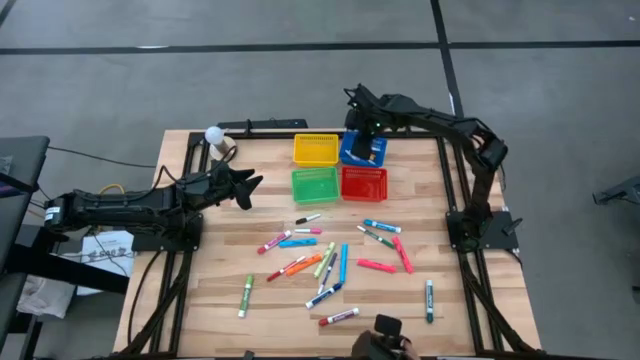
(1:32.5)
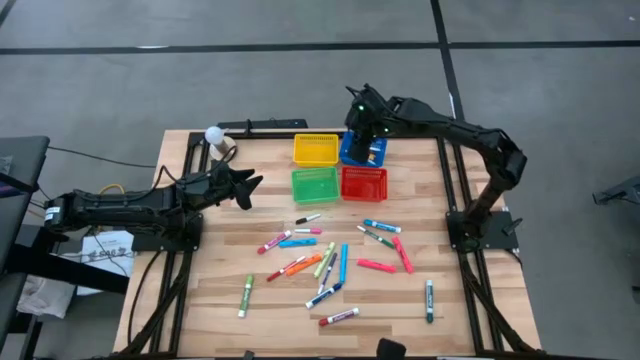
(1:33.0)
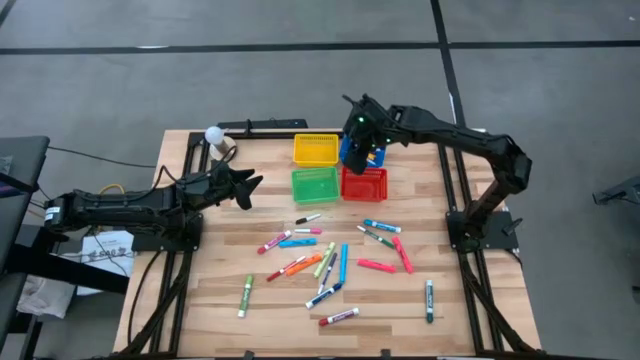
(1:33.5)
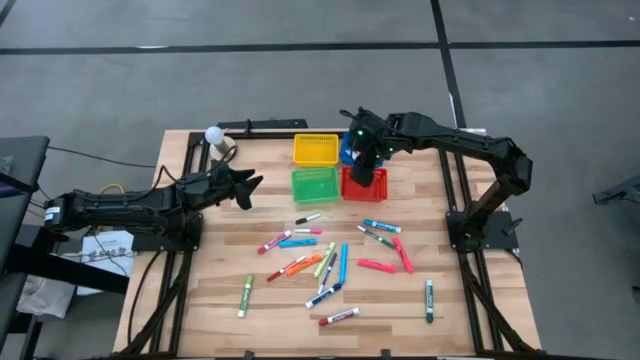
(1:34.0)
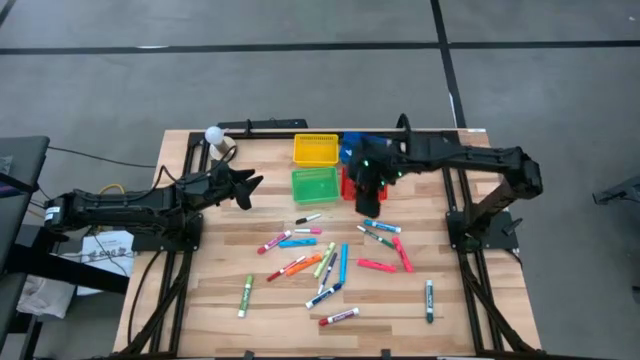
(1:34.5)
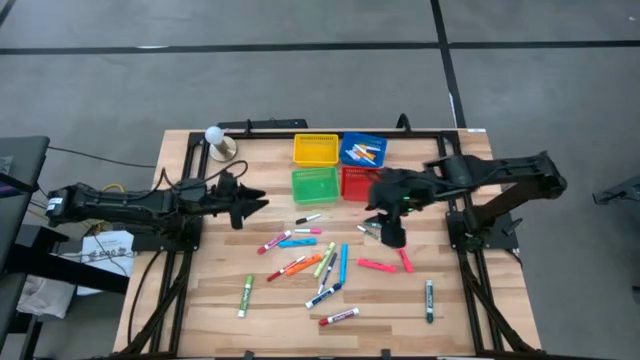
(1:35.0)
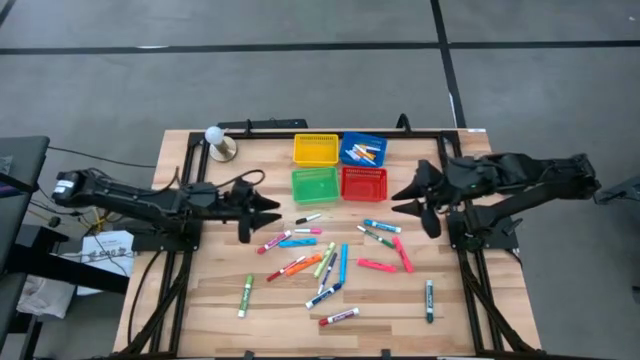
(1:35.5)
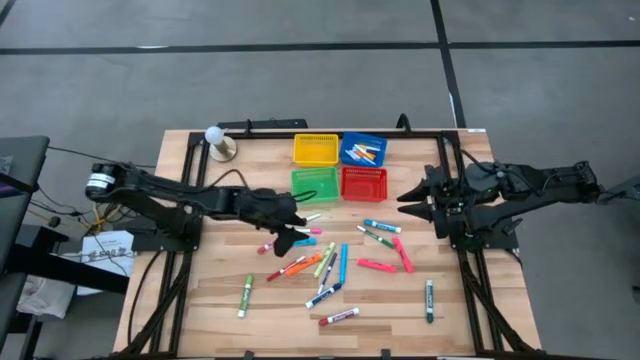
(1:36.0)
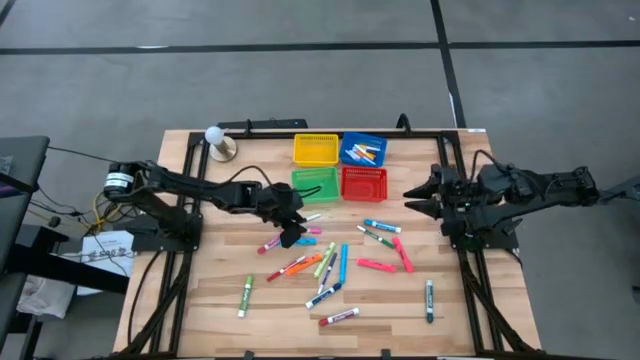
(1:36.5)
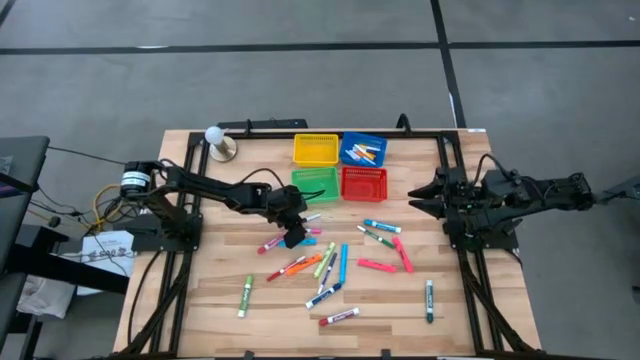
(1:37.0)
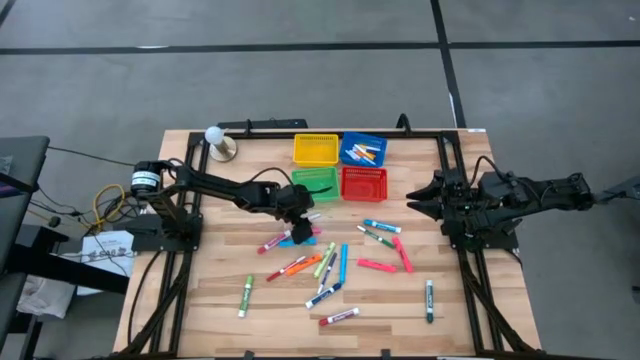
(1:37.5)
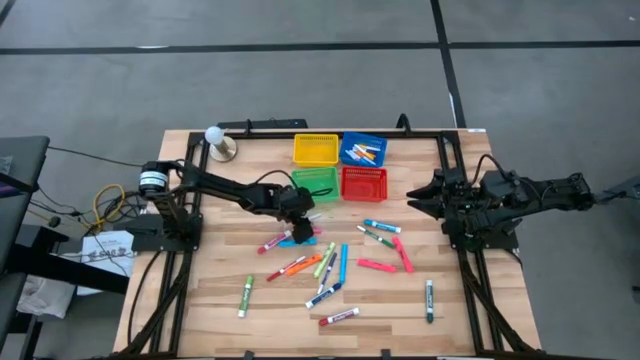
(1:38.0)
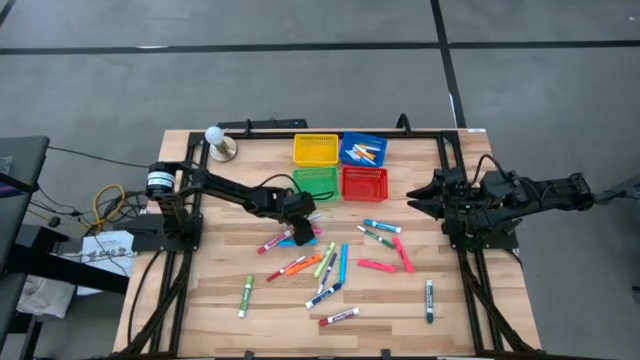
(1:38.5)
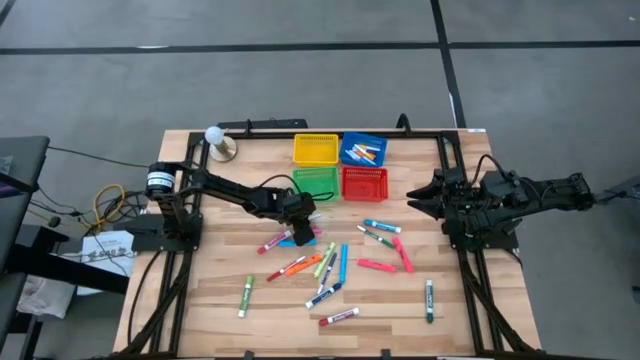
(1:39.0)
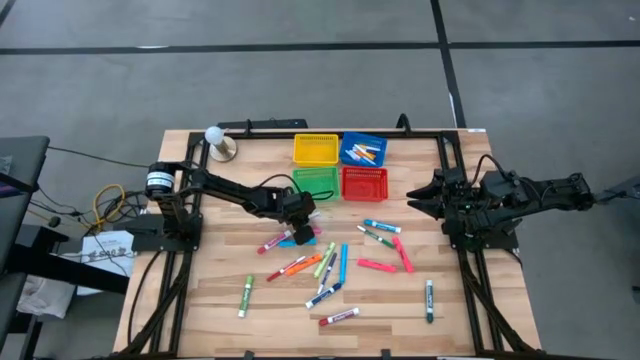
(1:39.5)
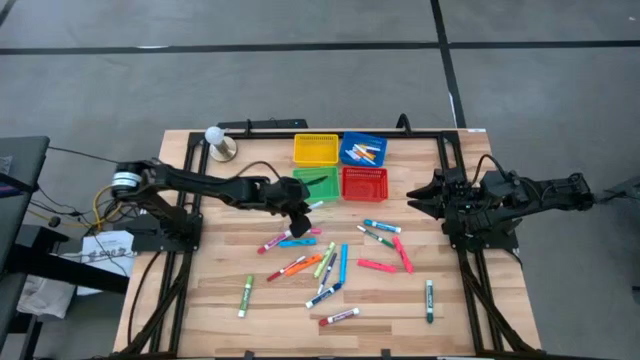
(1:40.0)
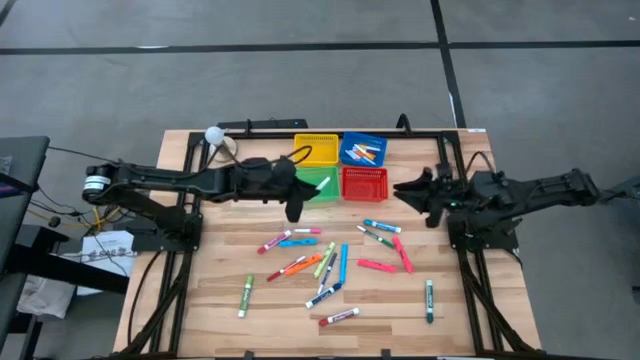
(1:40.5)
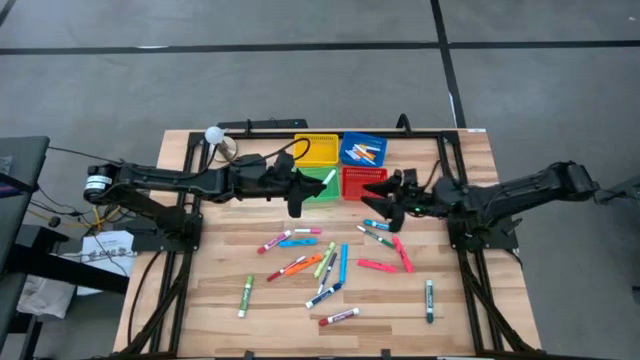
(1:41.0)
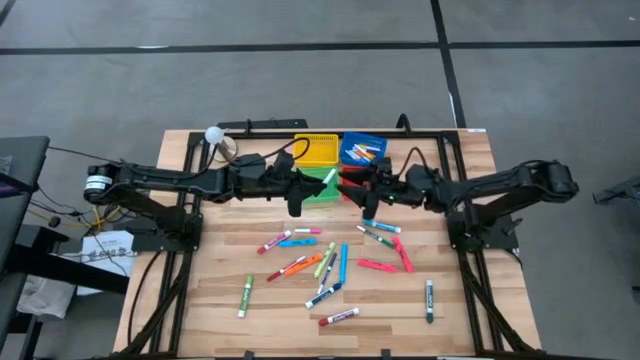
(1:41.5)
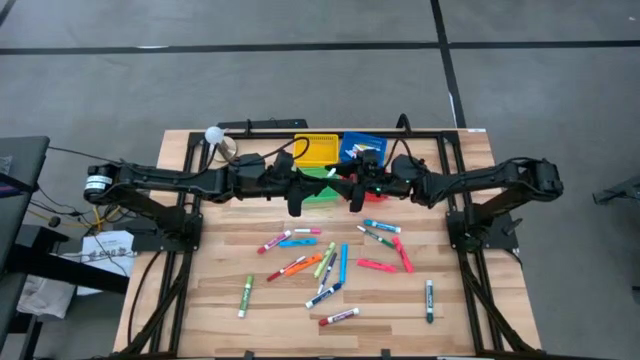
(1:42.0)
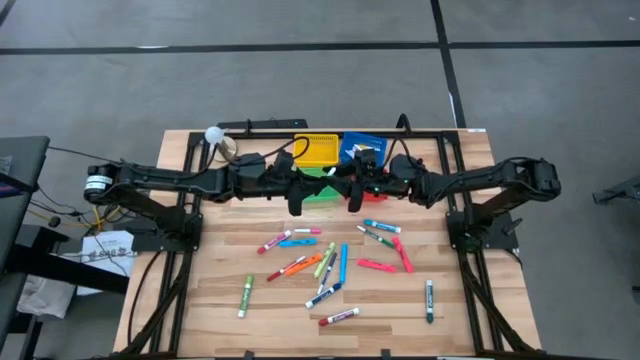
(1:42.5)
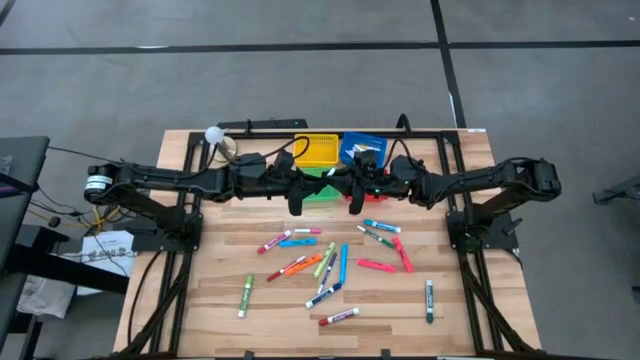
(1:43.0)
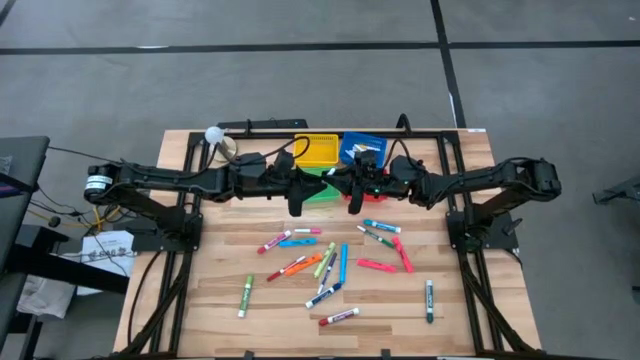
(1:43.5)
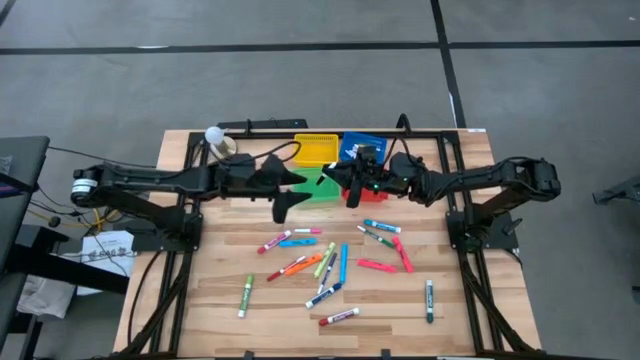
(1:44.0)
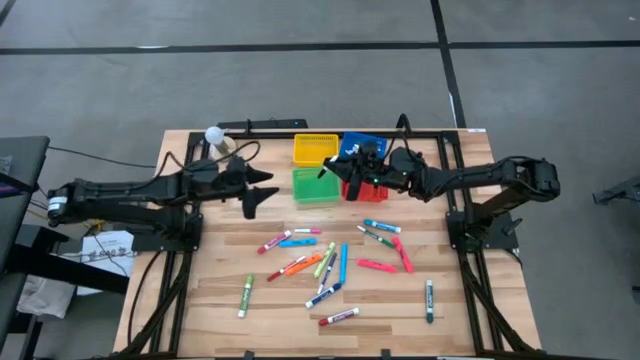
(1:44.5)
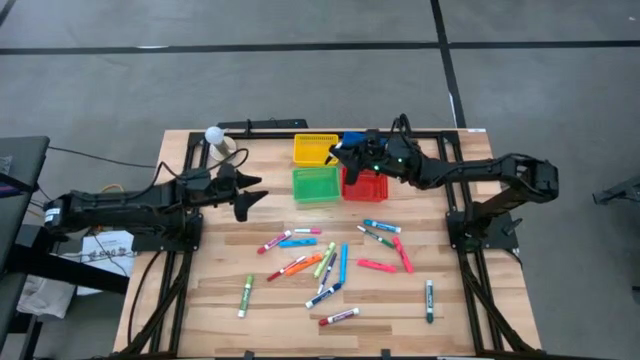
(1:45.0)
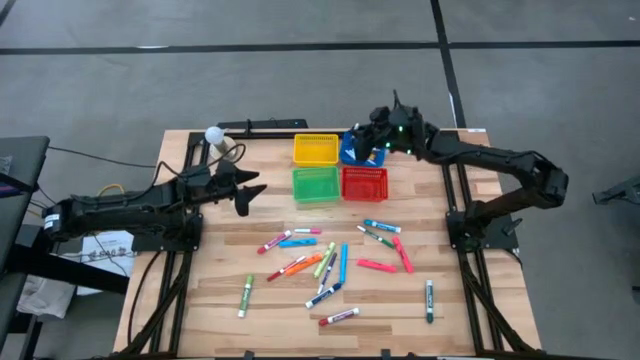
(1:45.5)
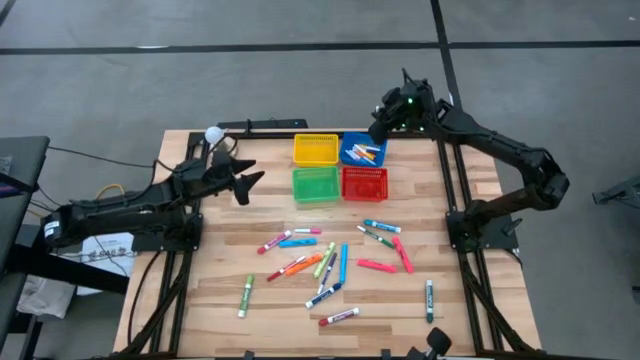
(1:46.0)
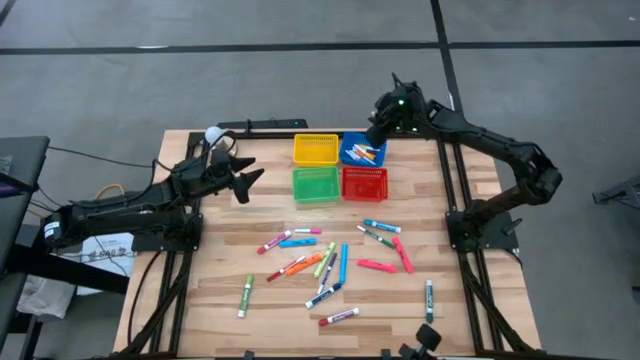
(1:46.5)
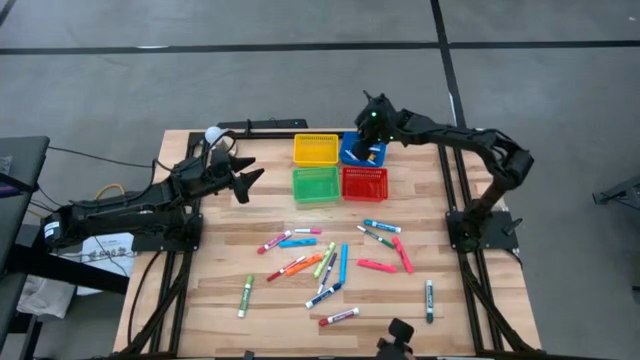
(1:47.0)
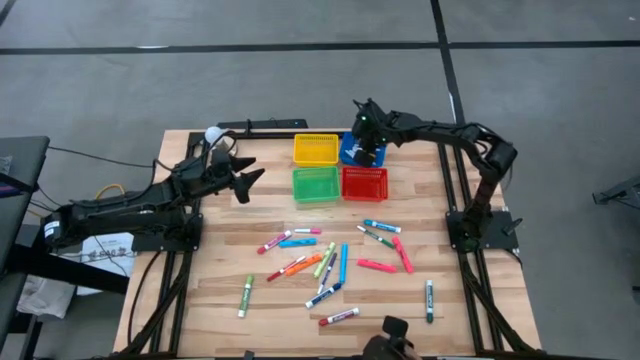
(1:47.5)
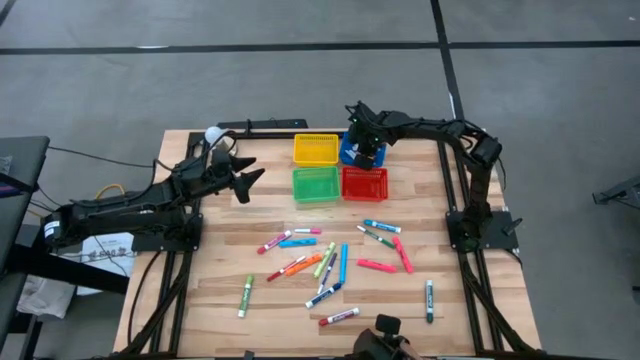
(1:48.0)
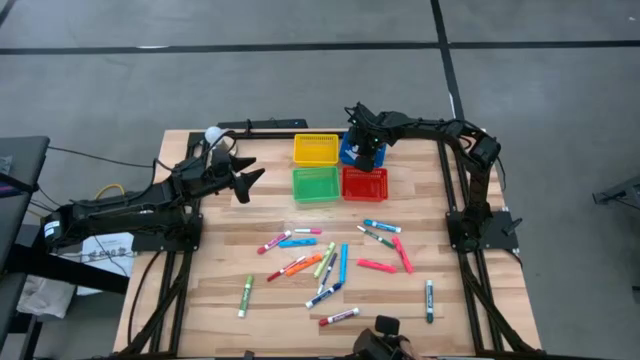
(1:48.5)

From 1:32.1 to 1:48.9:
Task: Pick & Place Markers
Put the black mini marker into the blue bin

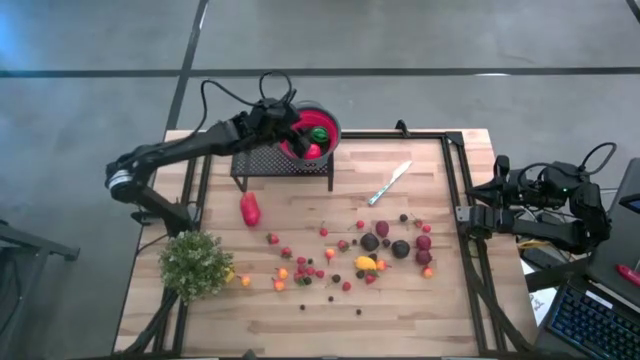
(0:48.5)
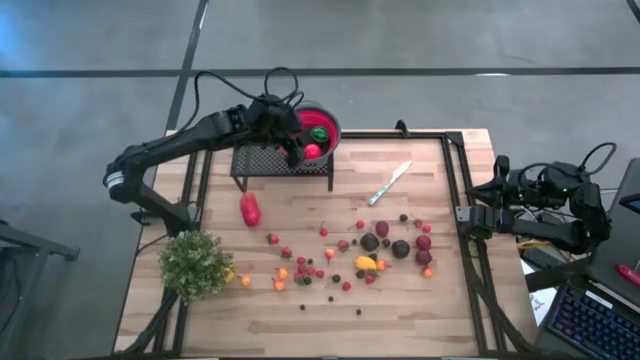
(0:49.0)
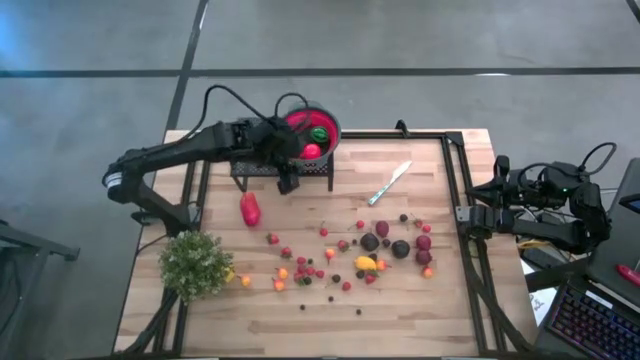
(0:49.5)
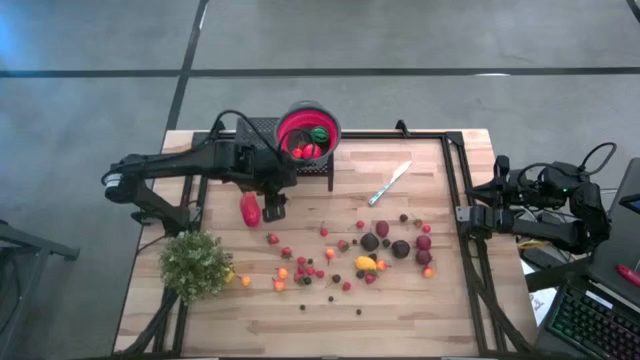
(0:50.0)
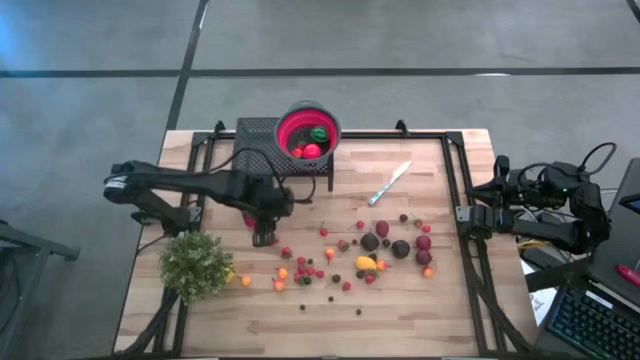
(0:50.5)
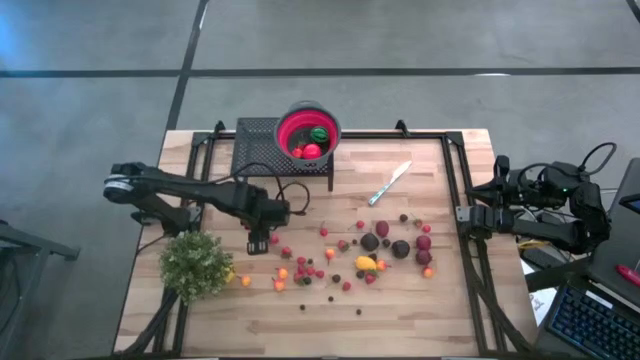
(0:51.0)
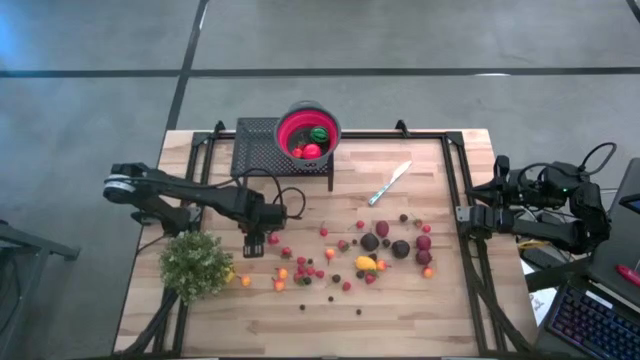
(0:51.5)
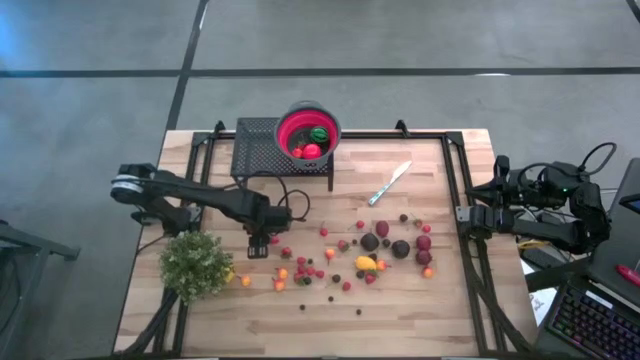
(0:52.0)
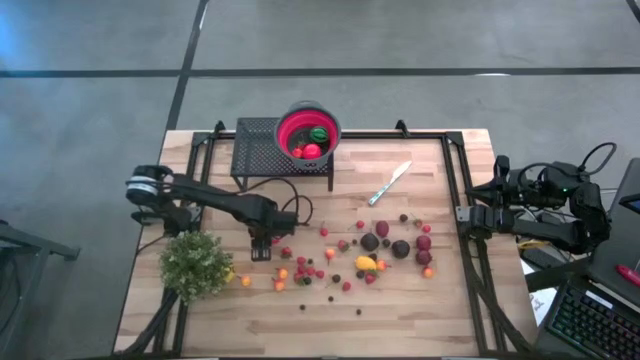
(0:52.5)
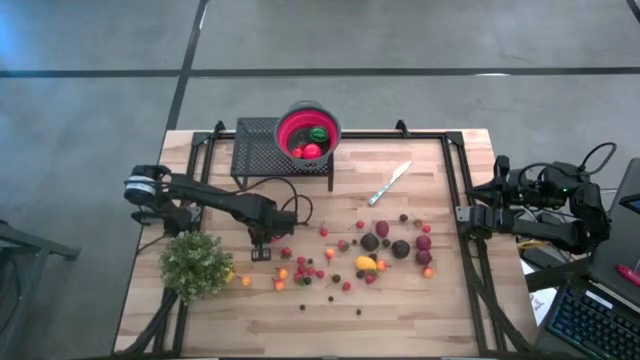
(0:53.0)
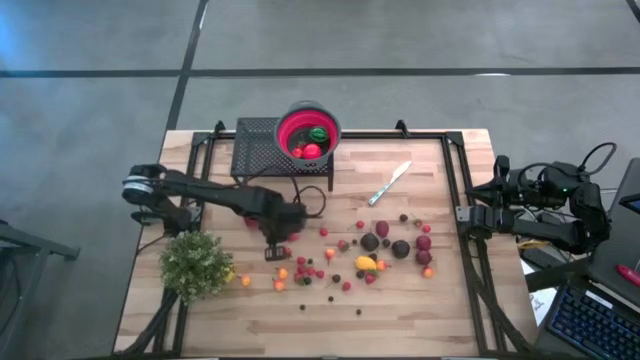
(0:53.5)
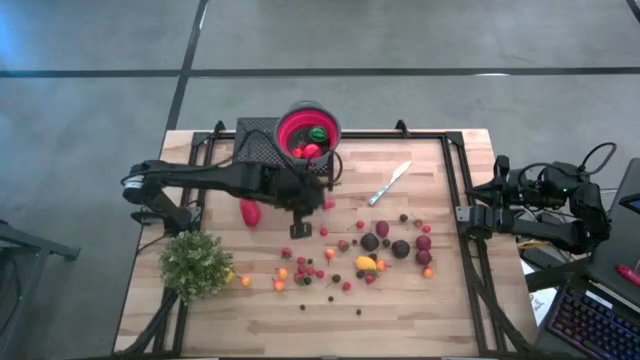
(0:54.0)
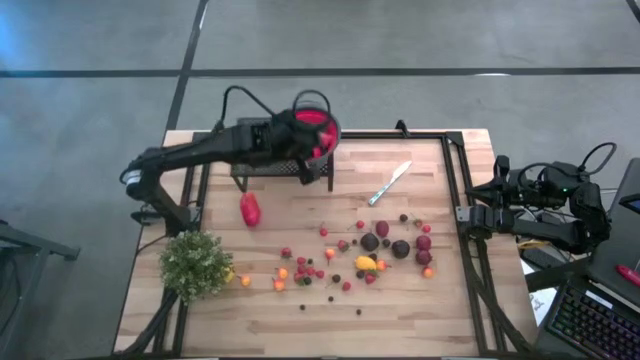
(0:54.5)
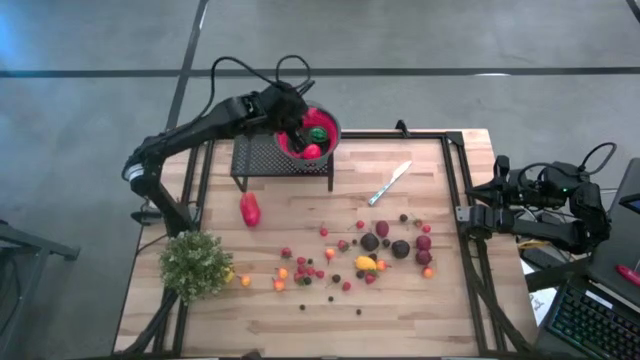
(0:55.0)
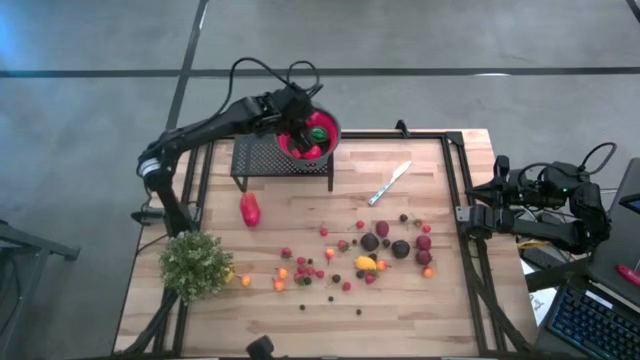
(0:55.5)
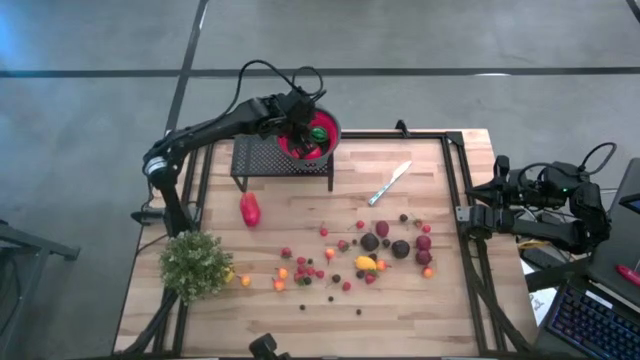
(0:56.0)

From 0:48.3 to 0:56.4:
Task: Pick & Place Fruit
Put the red strawberry into the red gray strainer bowl on the shelf
